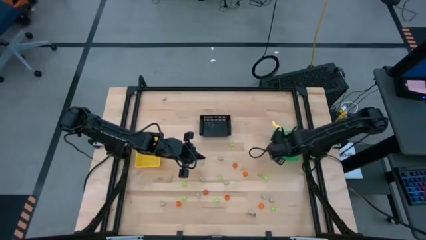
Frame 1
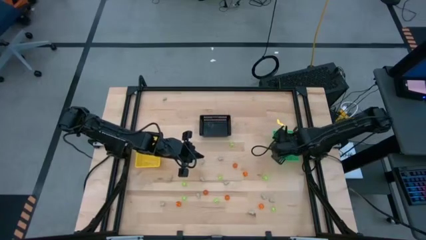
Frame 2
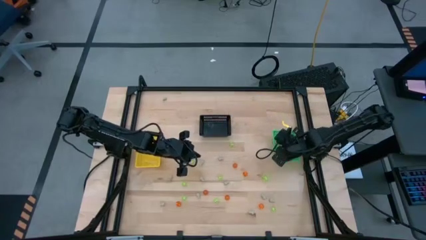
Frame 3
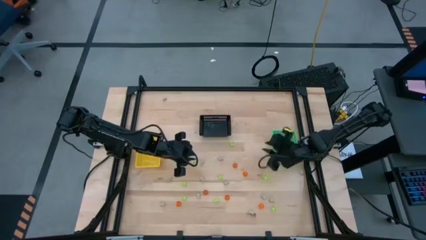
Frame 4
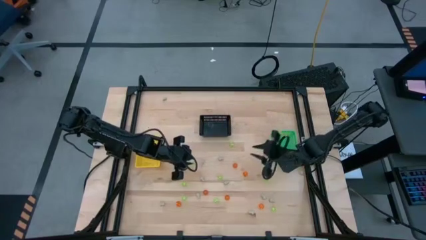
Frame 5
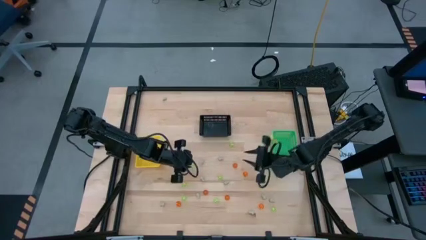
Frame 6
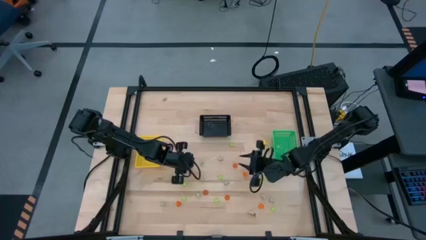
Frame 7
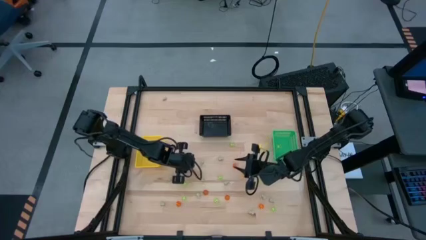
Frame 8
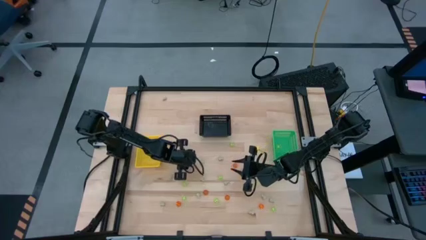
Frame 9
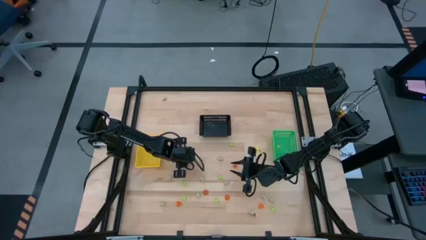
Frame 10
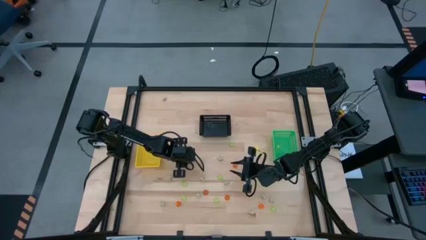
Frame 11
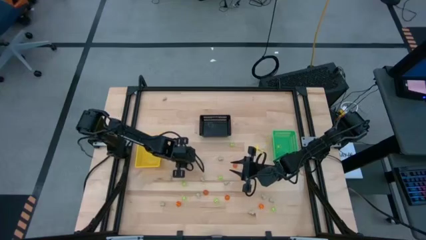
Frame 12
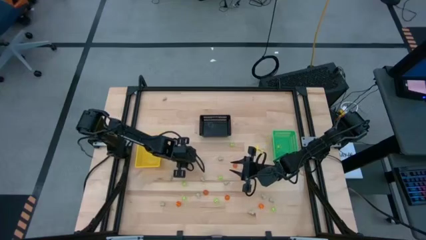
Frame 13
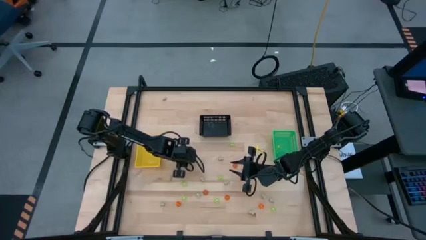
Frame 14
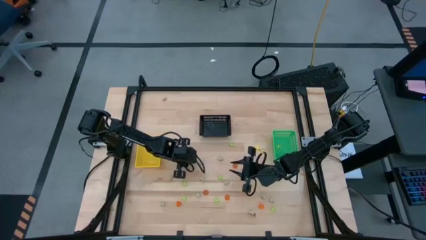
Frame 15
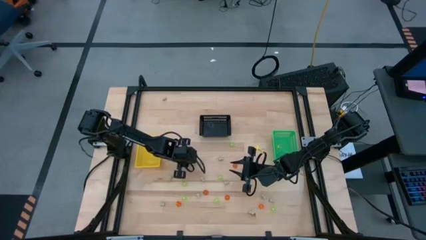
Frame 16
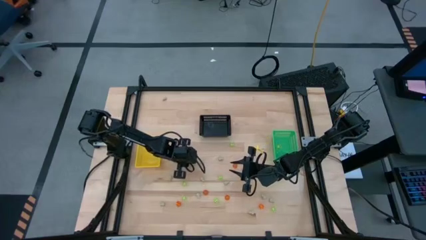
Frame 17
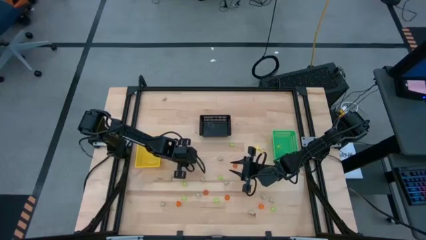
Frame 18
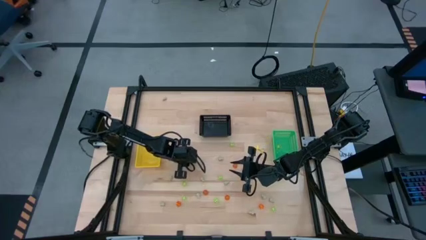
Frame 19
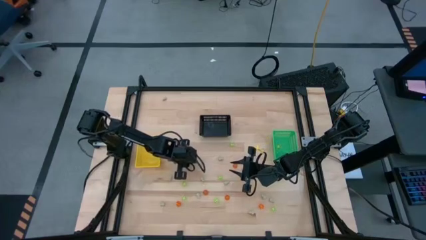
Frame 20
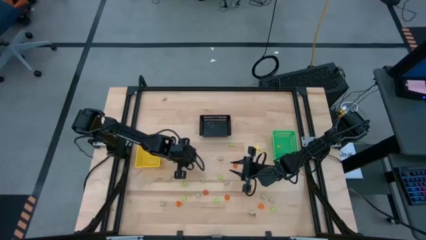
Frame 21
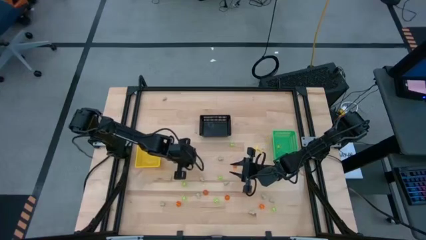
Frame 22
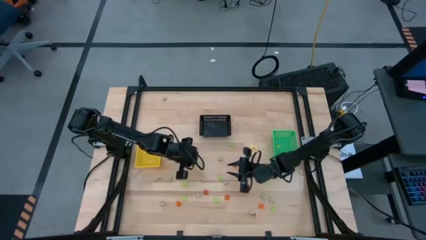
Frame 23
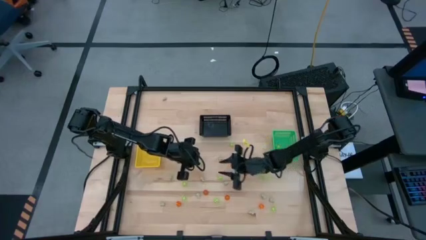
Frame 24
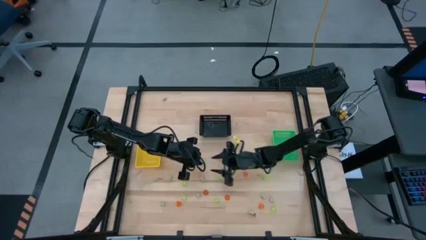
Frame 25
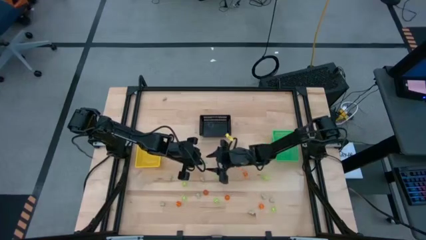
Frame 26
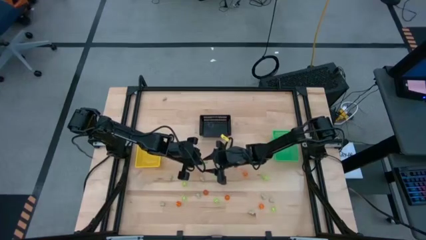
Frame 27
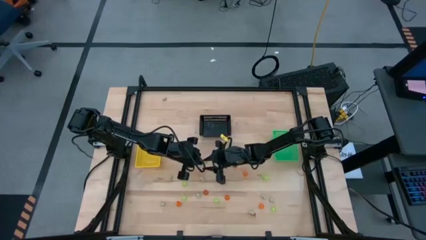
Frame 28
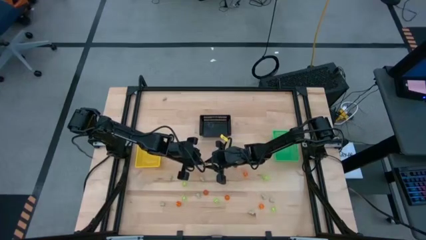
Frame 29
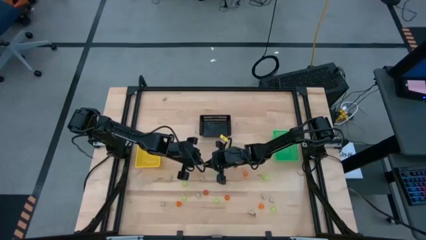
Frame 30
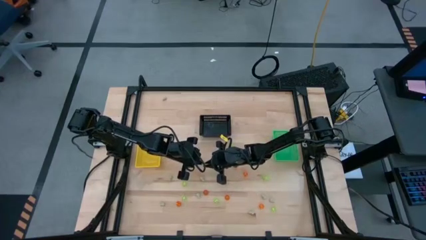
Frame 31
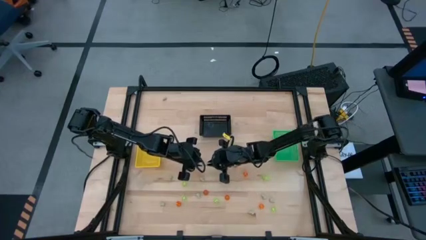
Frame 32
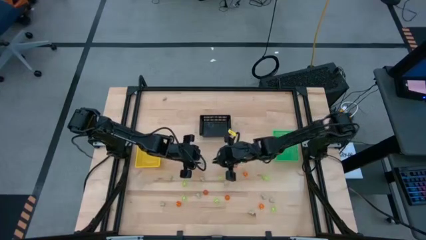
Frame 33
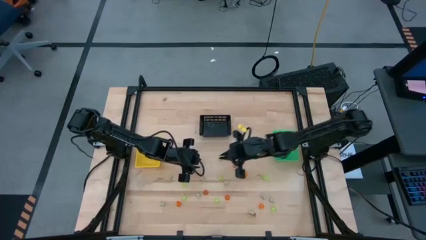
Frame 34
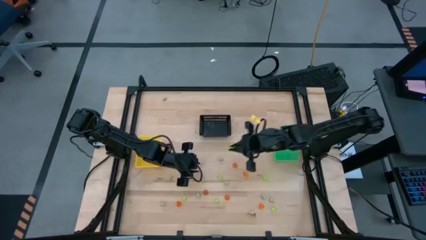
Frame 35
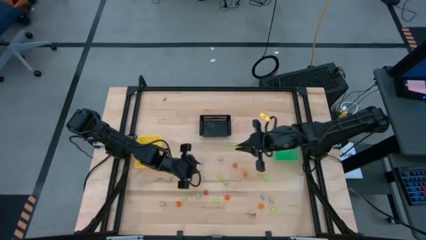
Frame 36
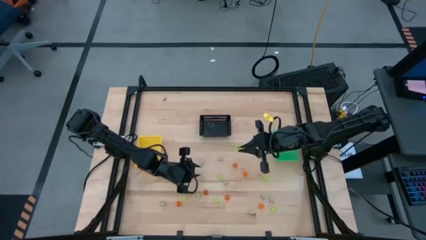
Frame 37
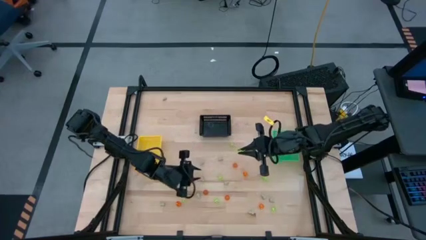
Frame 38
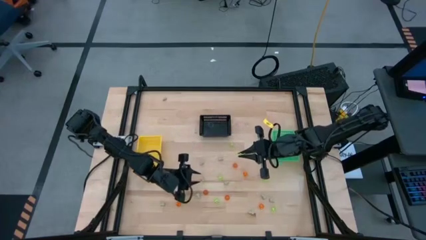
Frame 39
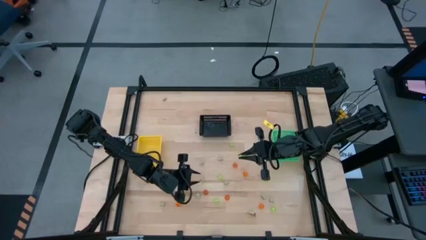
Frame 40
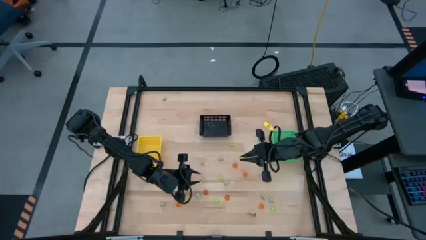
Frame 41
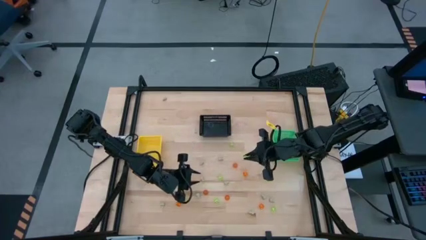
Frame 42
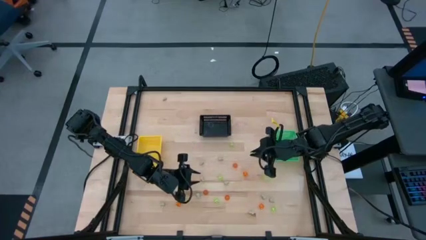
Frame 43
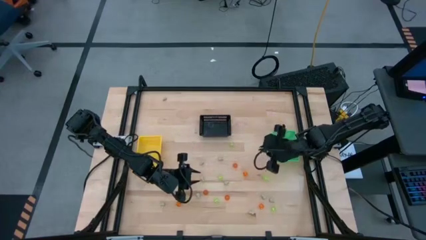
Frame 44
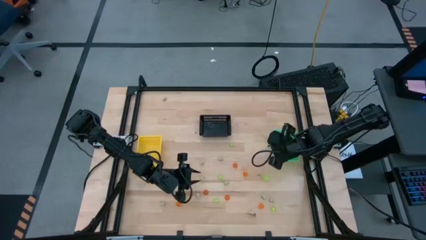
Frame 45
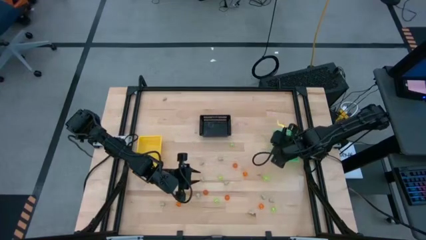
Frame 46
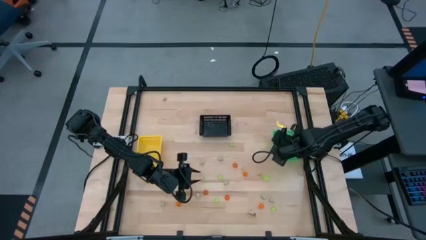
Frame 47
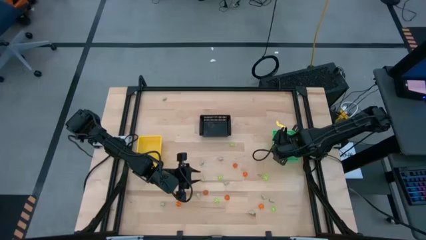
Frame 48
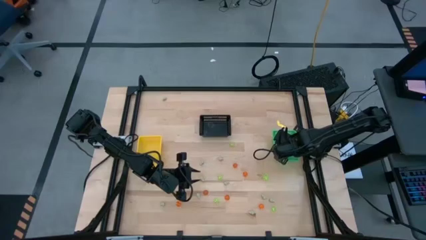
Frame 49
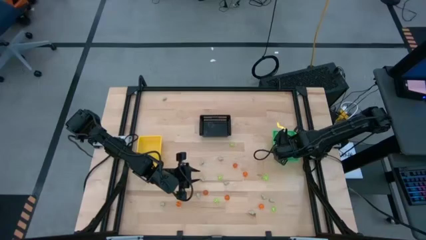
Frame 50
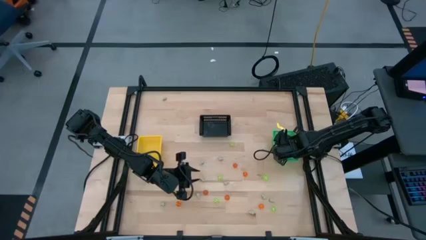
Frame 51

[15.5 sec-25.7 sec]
Task: Sort Halloween decoration
Put the green spider toy into the green bin

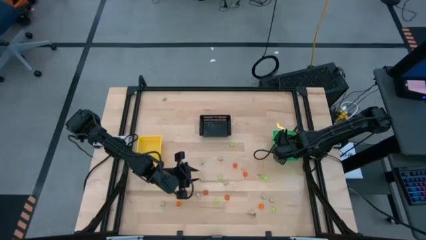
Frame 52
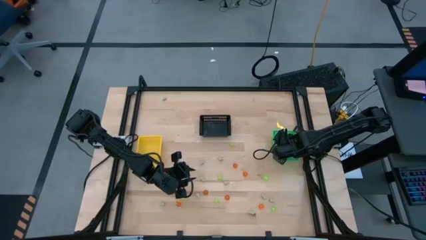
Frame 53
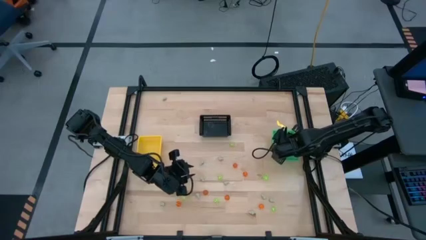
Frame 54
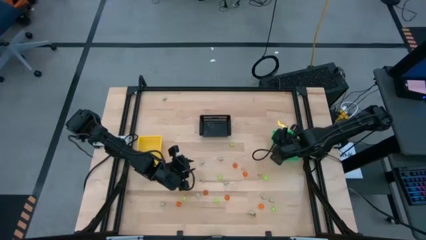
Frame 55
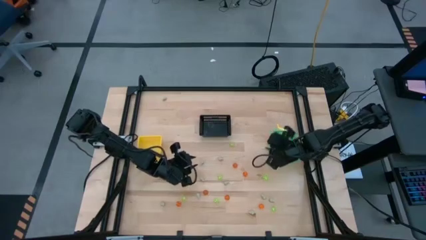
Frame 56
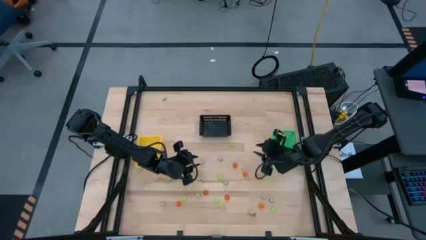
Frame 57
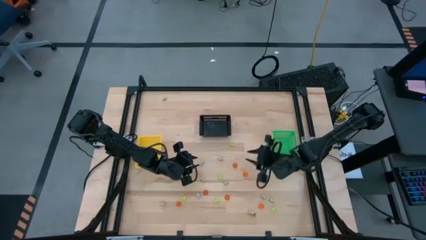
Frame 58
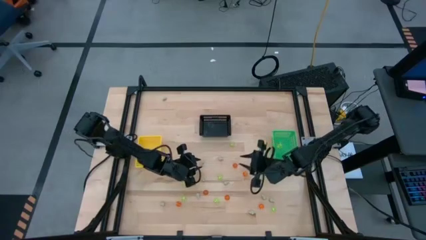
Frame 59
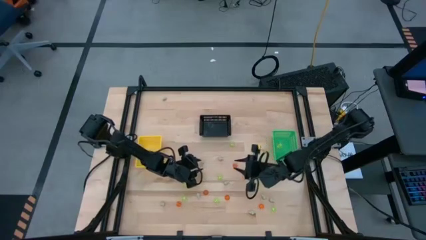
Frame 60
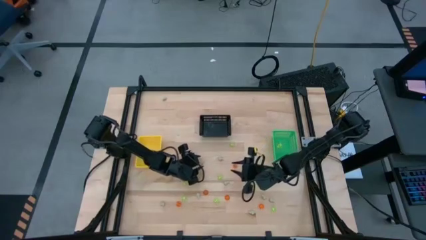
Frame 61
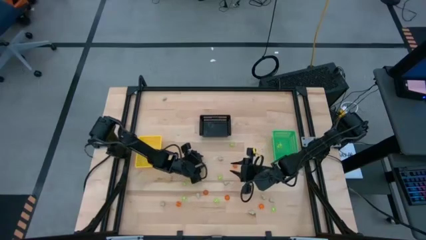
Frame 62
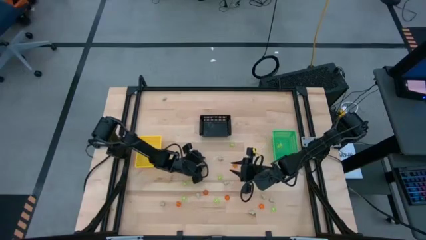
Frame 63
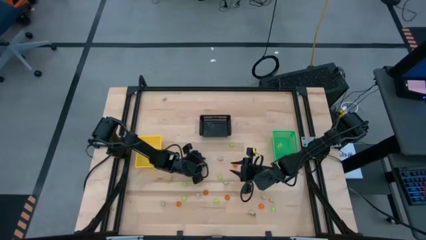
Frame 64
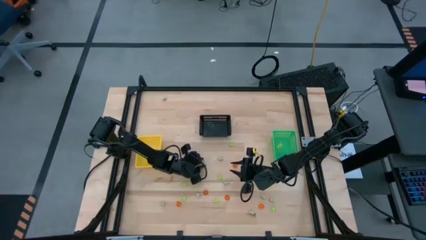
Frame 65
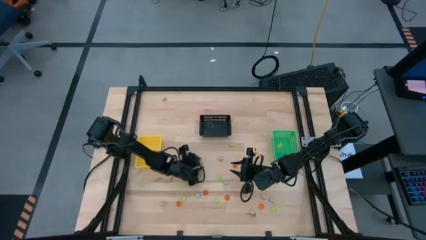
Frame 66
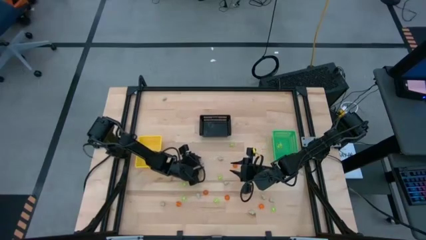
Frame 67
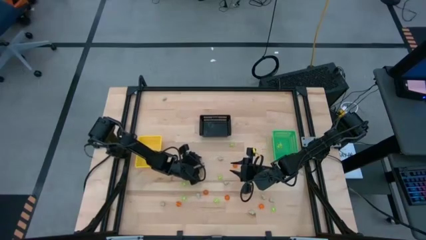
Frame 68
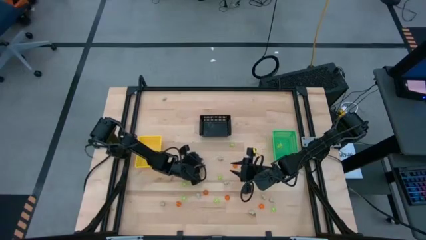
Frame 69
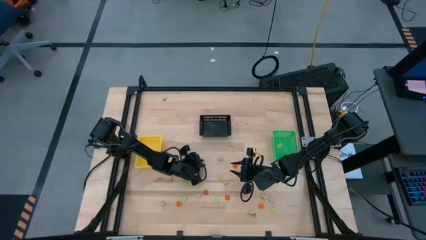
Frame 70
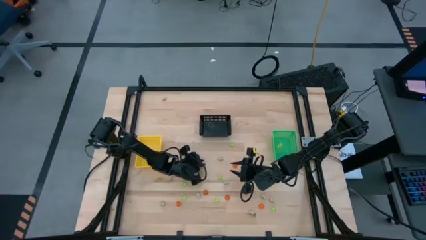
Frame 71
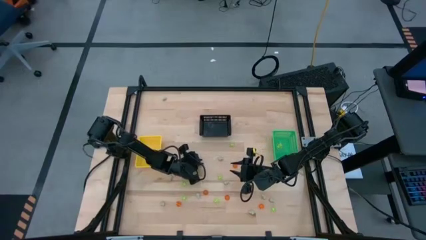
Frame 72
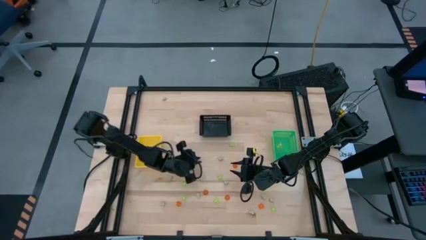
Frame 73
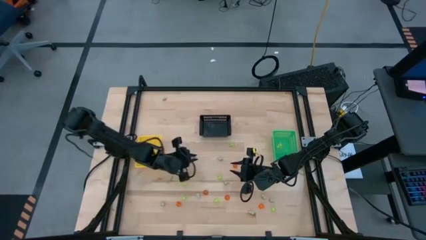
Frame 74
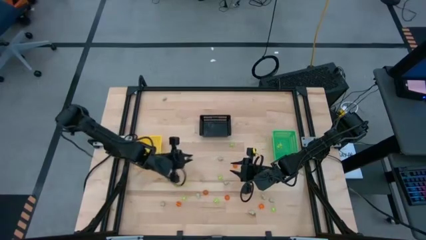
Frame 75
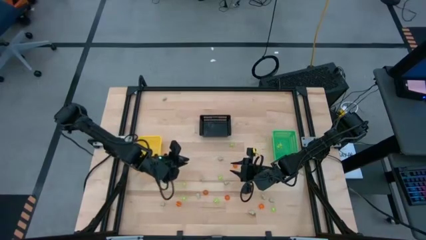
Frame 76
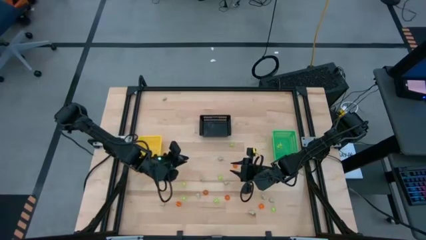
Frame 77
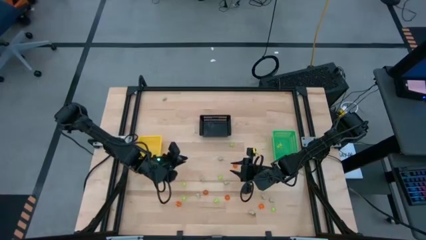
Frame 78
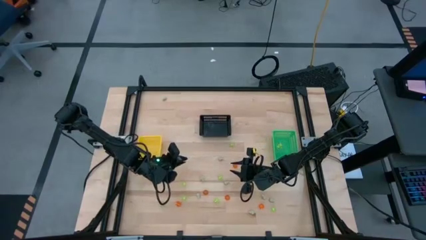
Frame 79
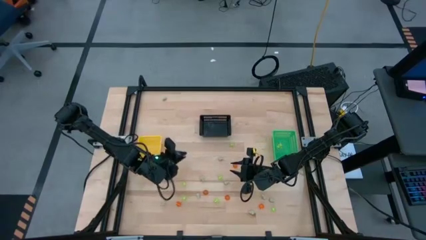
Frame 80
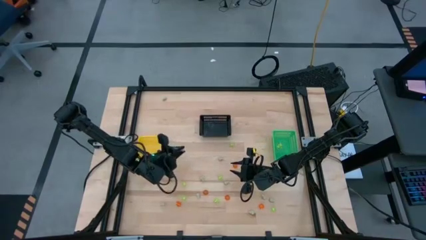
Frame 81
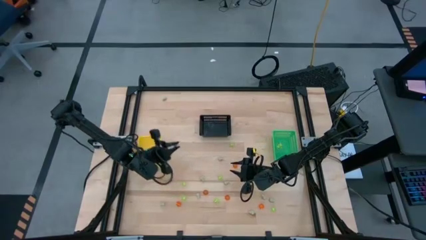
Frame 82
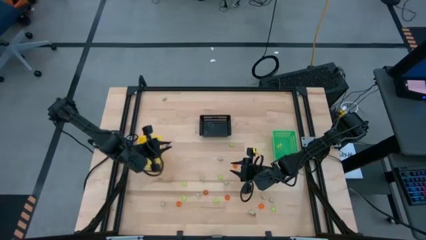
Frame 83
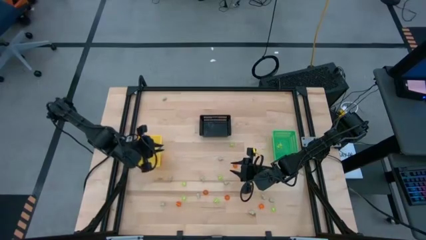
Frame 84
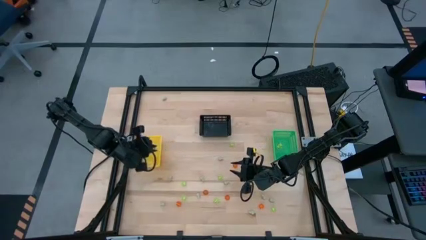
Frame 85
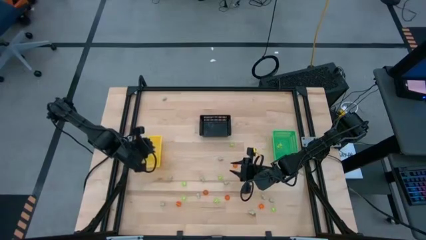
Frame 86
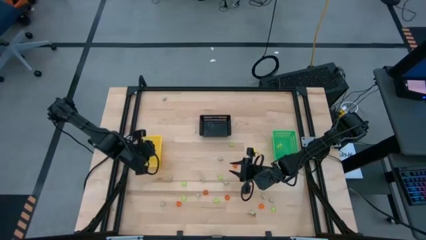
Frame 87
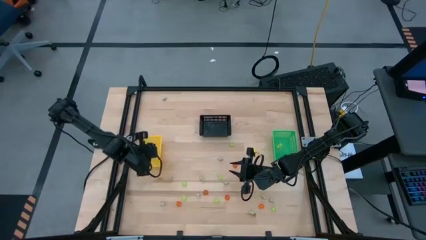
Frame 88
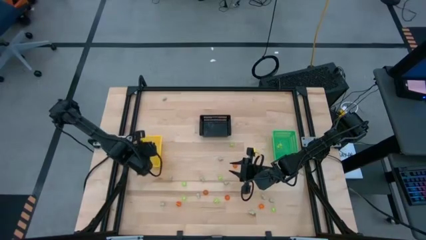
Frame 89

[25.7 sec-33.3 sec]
Put the white skull toy into the yellow bin
